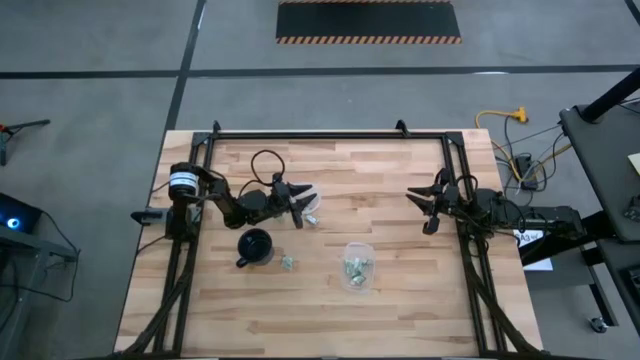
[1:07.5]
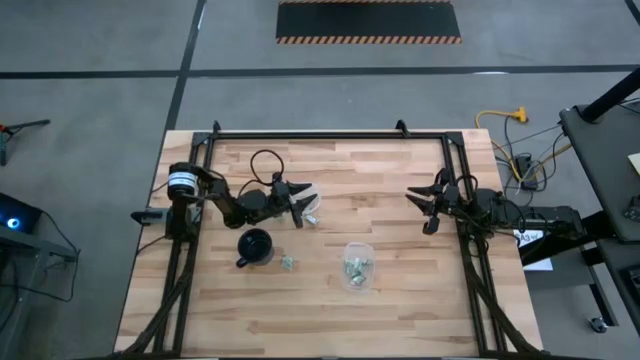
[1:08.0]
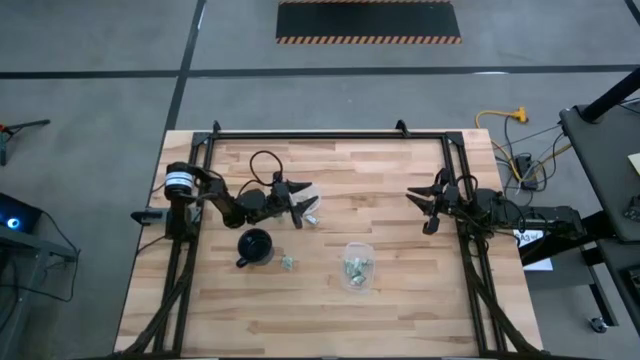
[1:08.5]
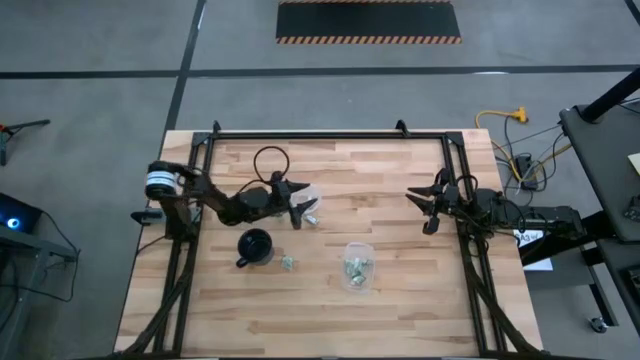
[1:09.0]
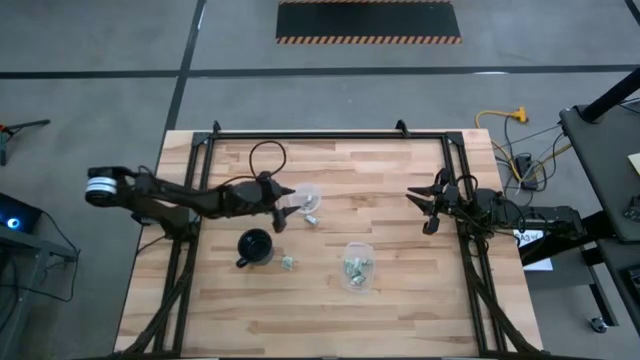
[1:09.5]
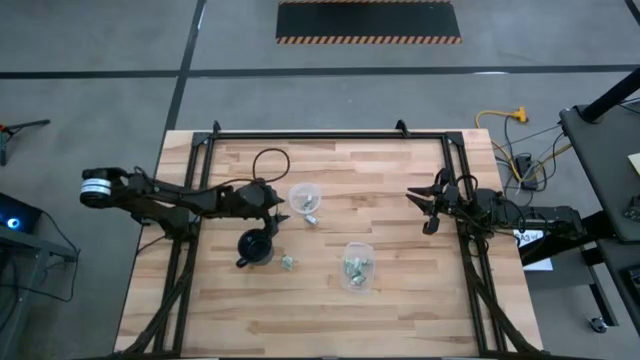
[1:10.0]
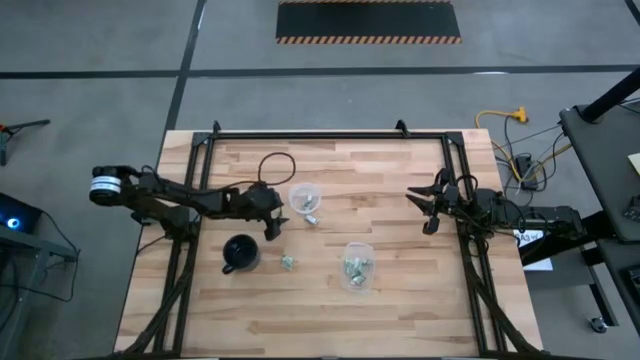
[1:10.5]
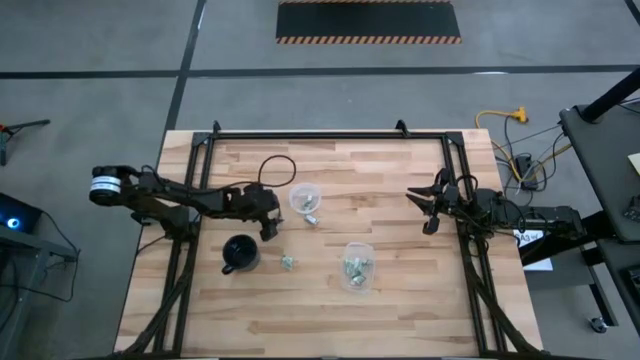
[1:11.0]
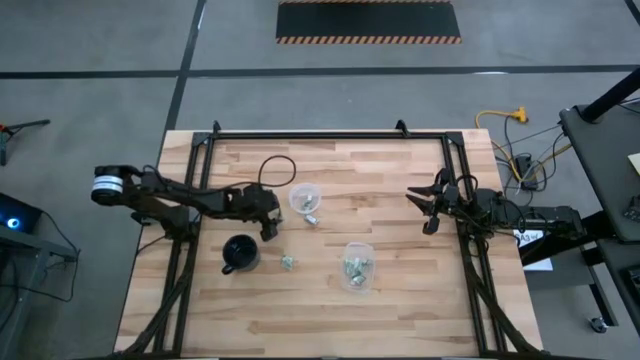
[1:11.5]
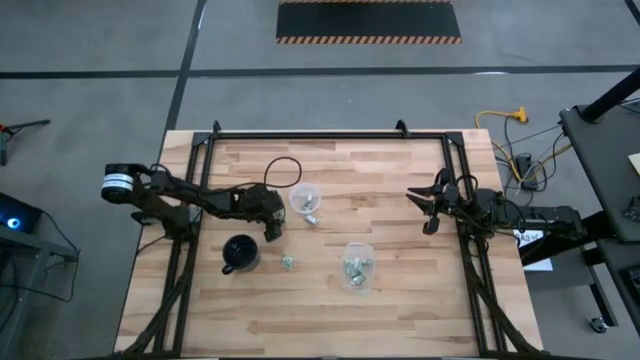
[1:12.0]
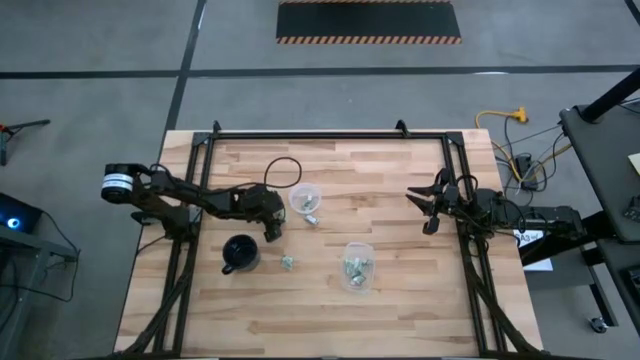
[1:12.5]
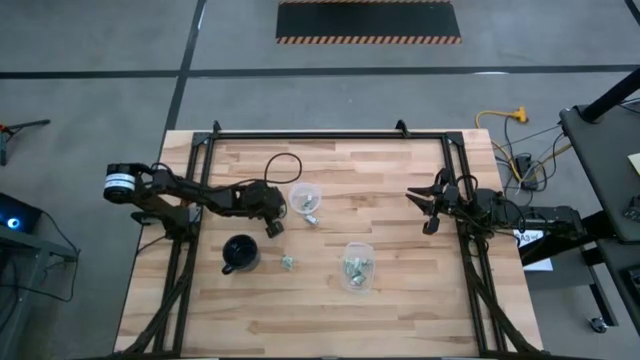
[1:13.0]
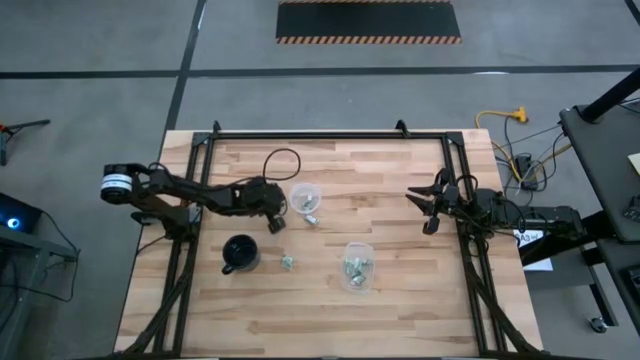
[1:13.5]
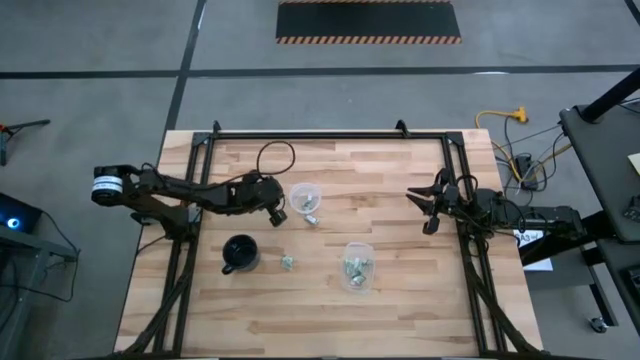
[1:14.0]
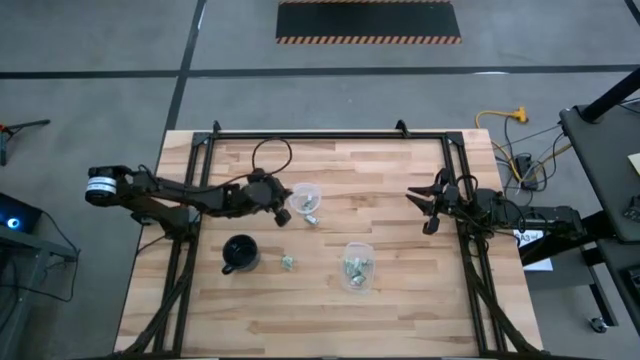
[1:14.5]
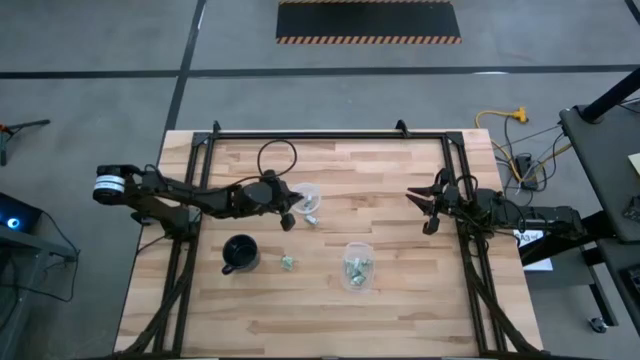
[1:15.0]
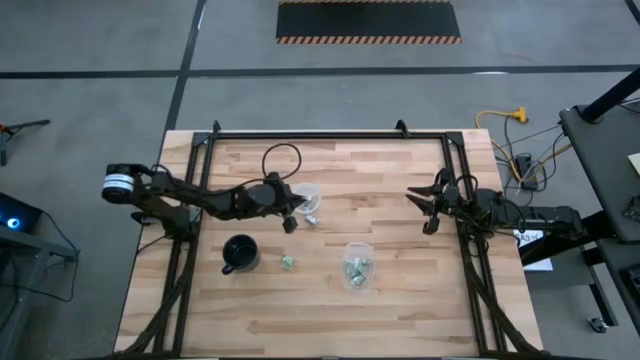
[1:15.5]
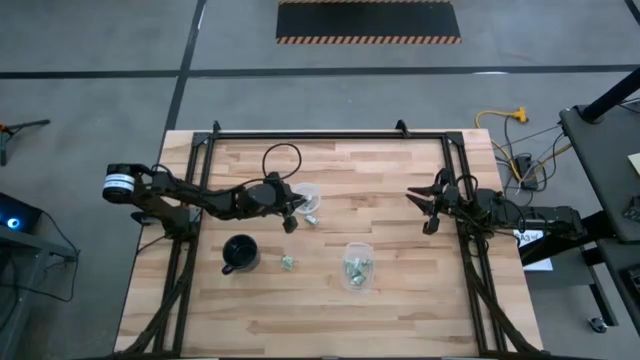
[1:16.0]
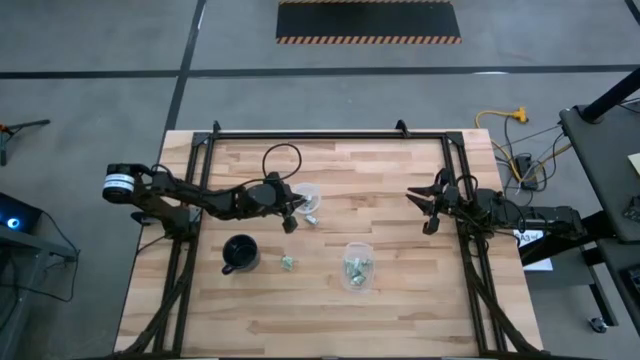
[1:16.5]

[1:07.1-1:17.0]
Task: Pick and place items into bin
Put the stevia packet into the round transparent bin

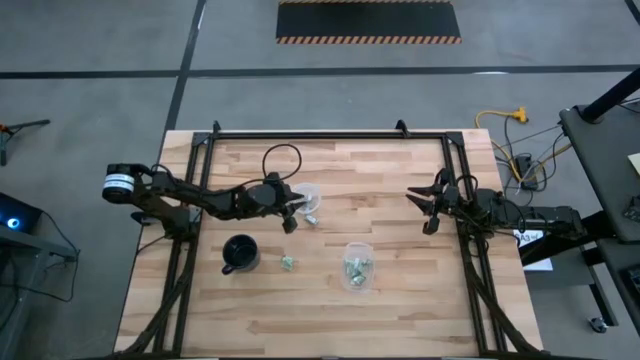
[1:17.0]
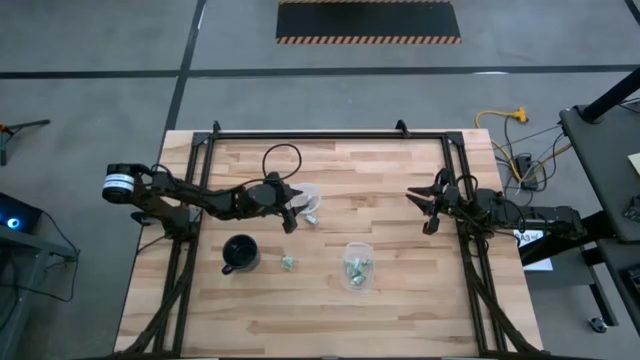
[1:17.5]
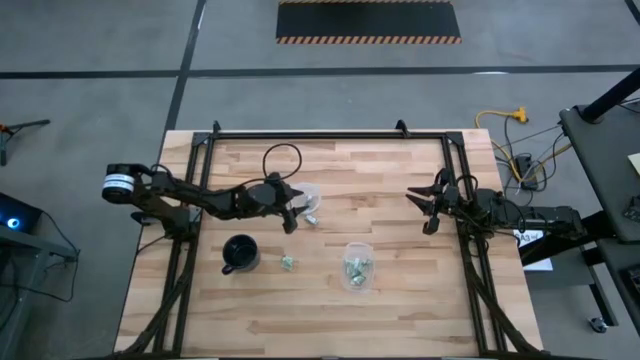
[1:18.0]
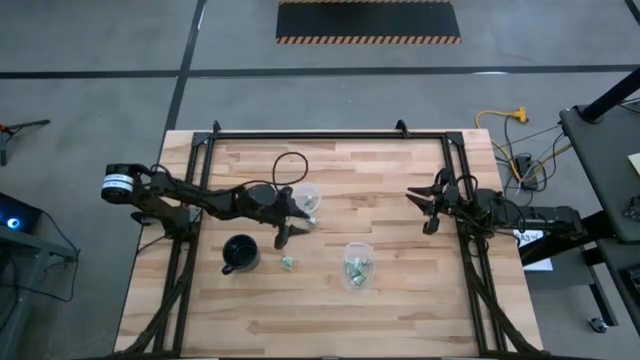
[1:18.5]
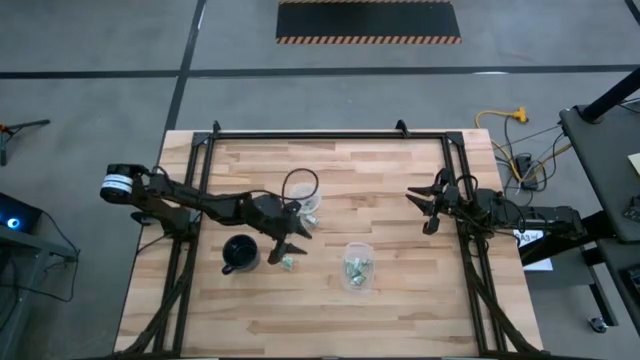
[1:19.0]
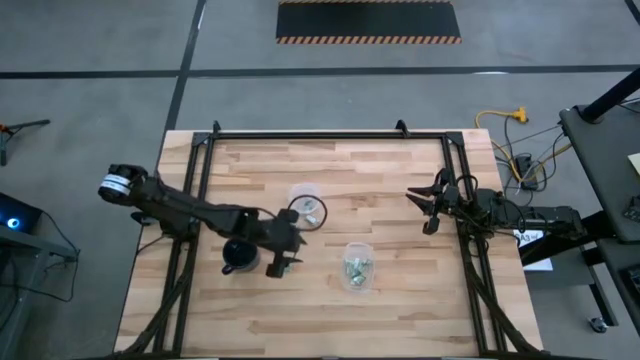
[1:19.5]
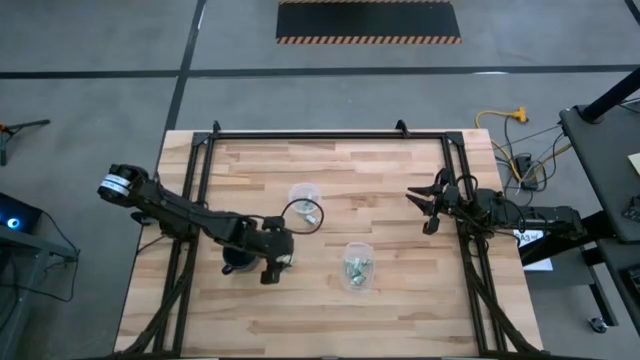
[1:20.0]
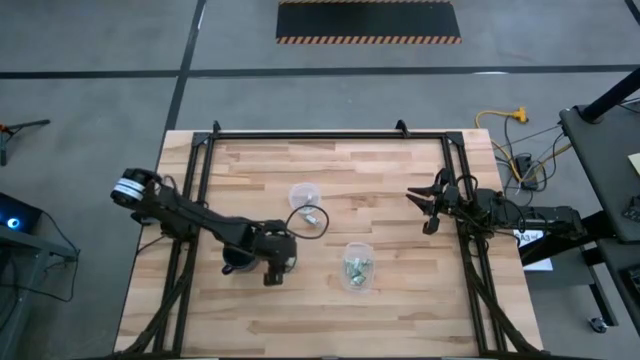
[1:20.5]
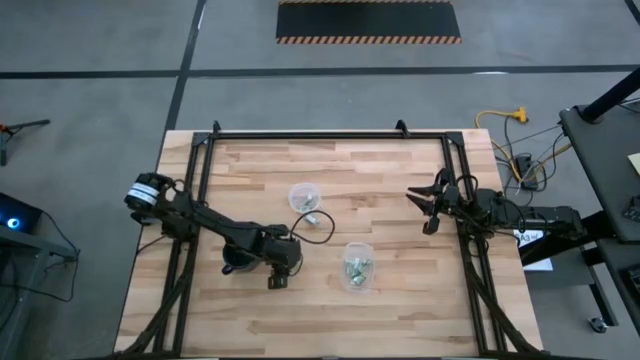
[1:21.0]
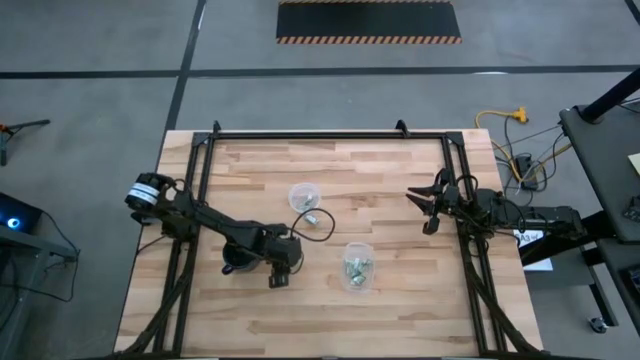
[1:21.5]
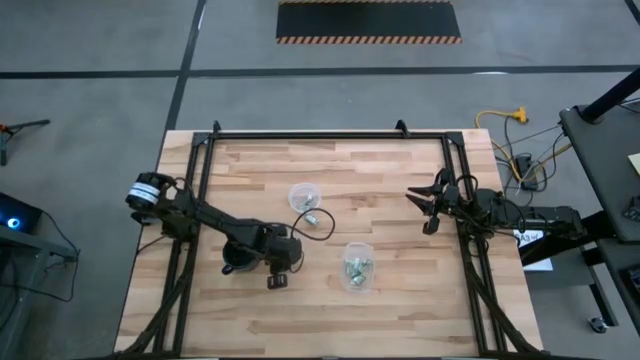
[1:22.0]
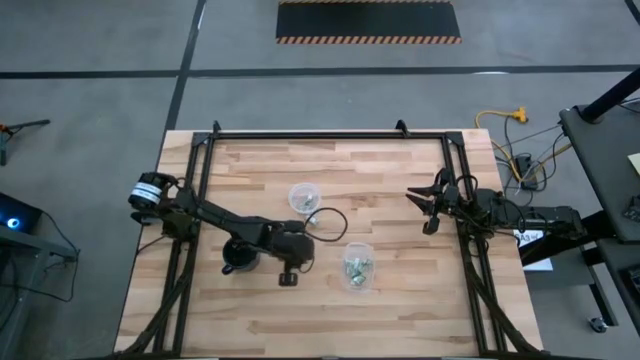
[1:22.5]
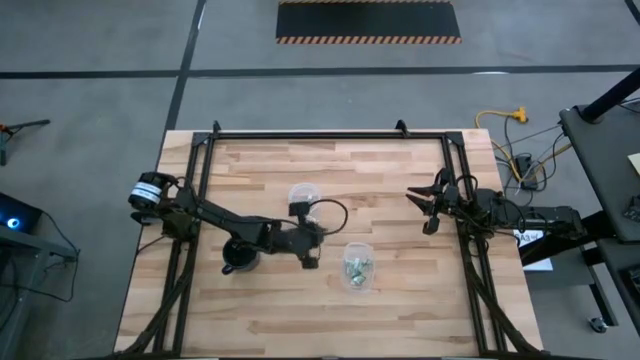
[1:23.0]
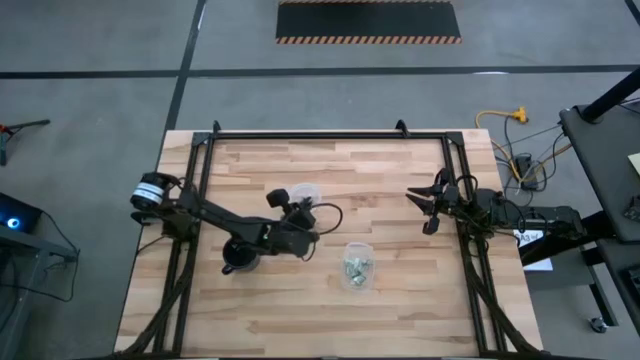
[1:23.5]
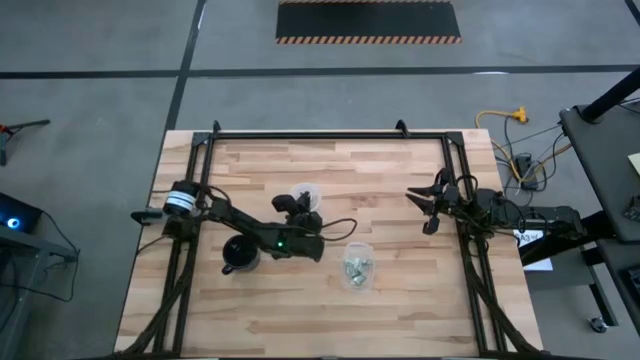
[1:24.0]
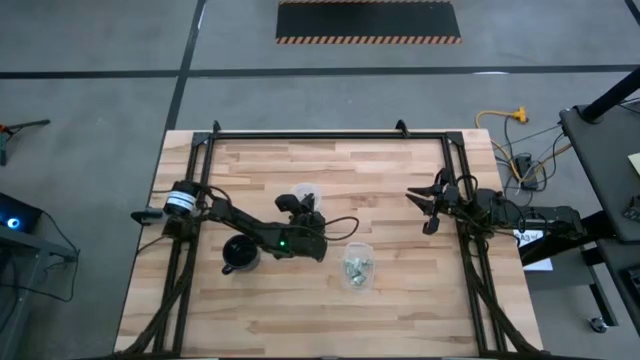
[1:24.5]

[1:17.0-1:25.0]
Put the stevia packet into the round transparent bin

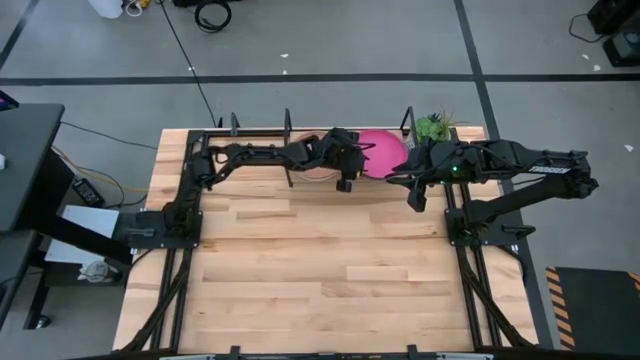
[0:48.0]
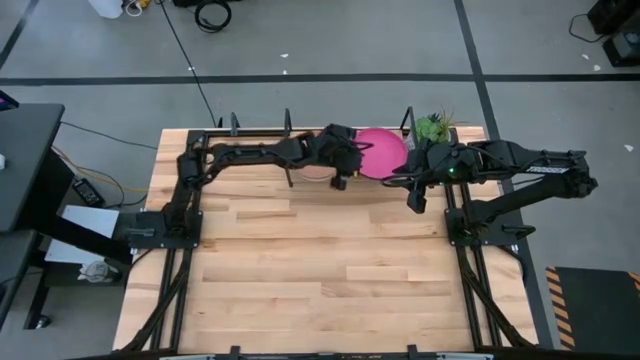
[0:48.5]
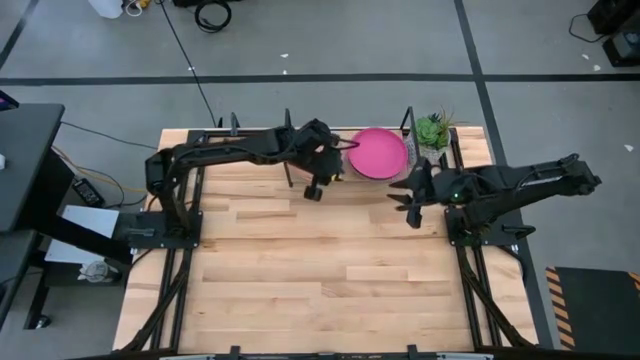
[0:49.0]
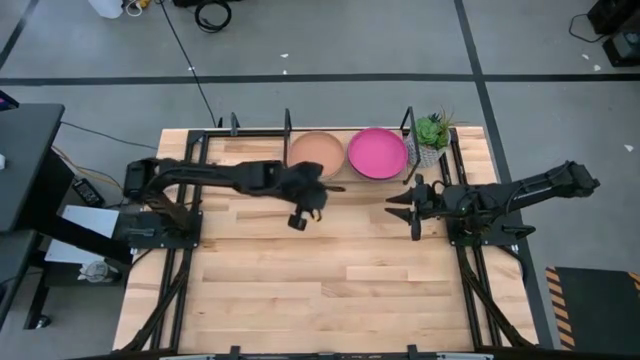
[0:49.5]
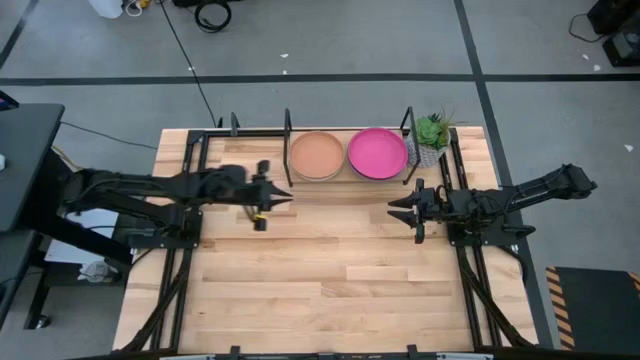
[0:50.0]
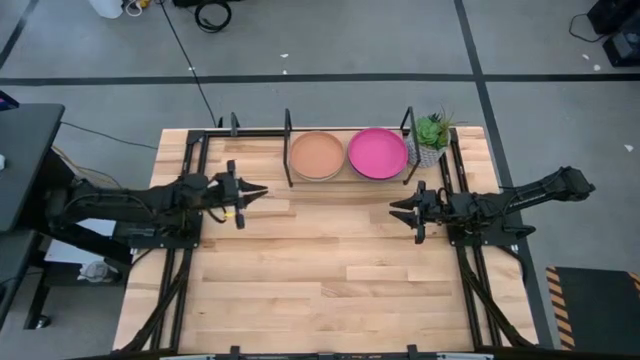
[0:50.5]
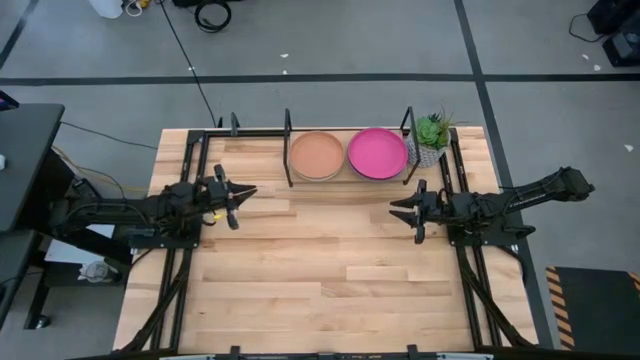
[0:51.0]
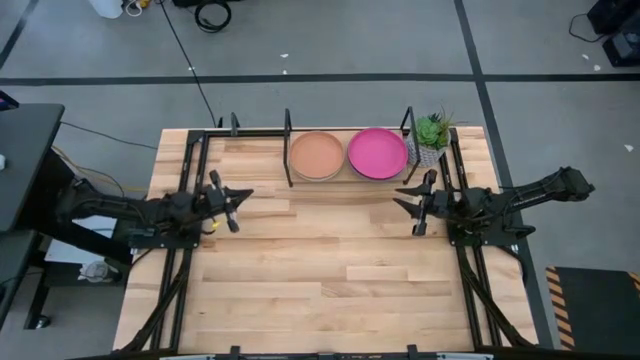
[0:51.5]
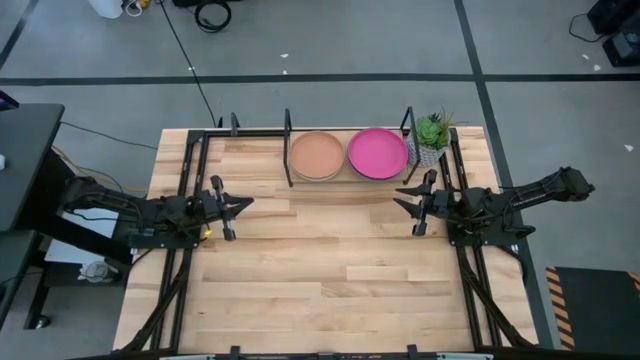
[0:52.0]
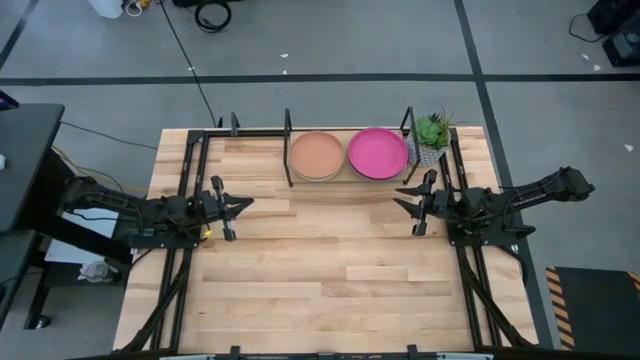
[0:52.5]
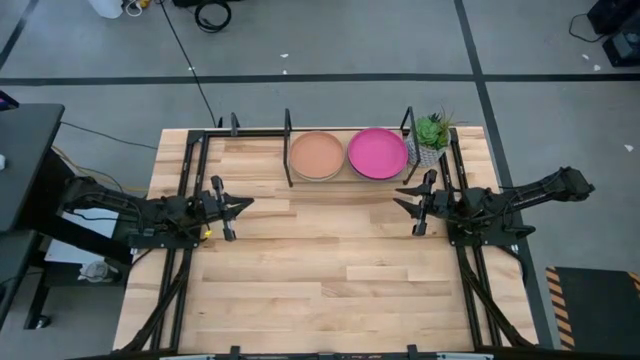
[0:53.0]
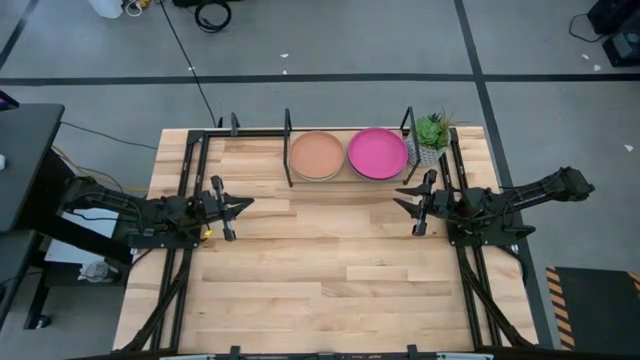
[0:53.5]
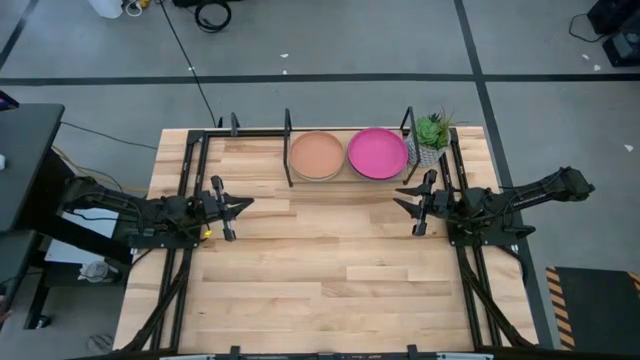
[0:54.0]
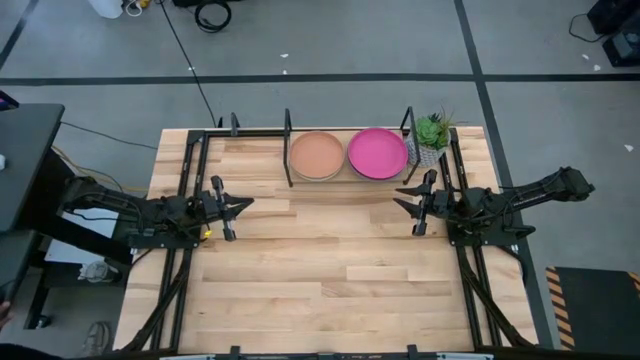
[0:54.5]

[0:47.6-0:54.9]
Task: Place and stack plates onto a shelf
Return to Home Position
